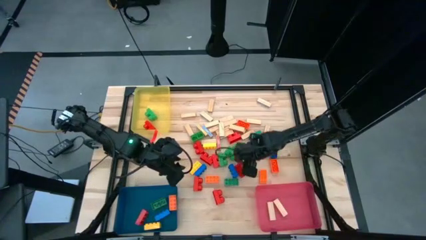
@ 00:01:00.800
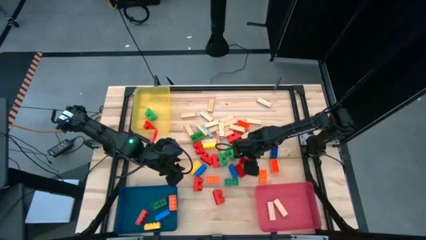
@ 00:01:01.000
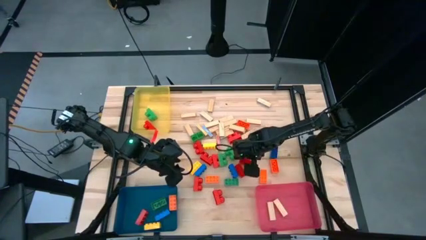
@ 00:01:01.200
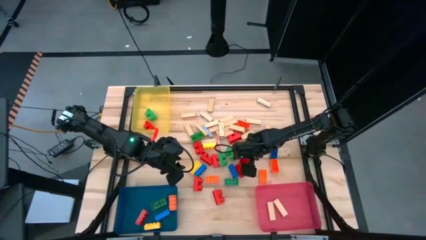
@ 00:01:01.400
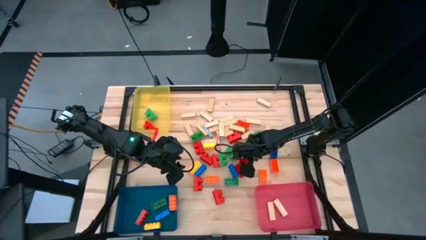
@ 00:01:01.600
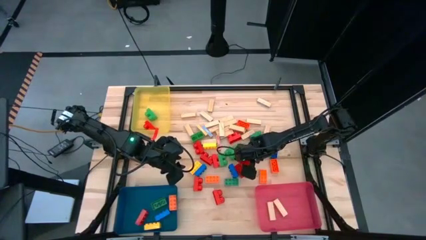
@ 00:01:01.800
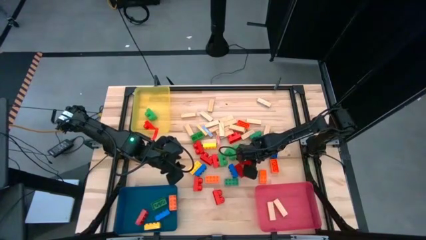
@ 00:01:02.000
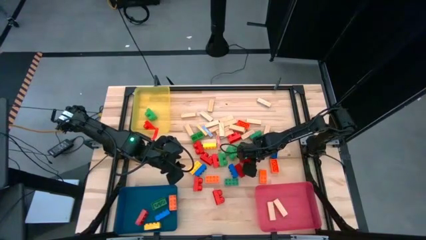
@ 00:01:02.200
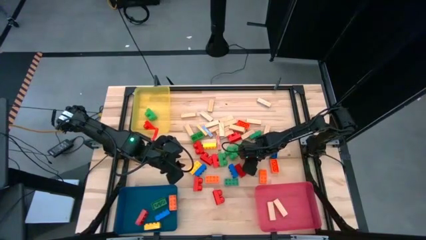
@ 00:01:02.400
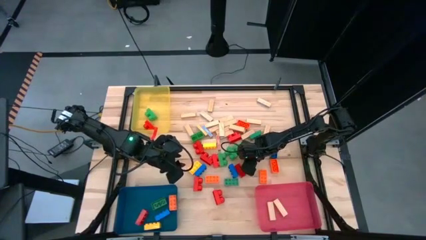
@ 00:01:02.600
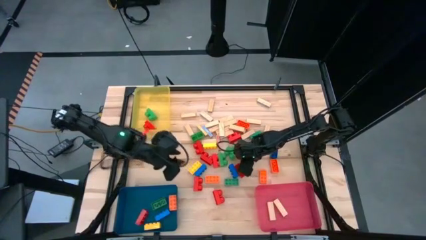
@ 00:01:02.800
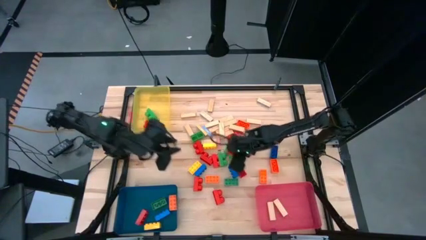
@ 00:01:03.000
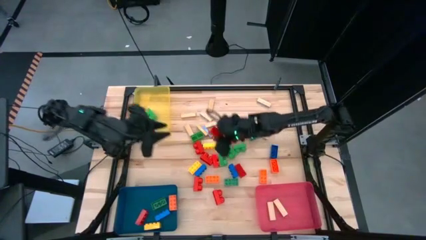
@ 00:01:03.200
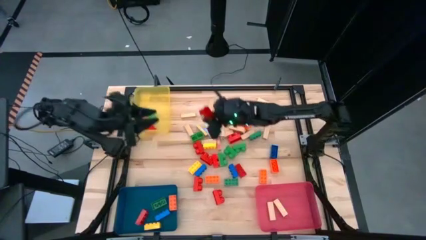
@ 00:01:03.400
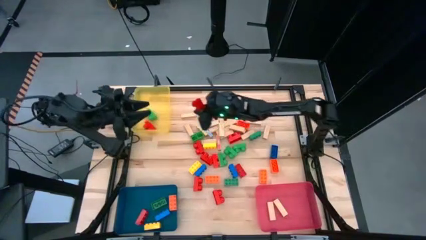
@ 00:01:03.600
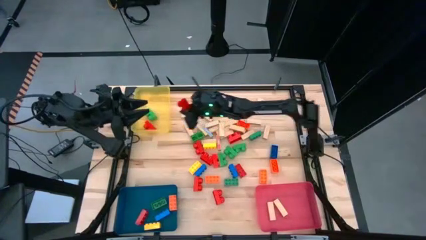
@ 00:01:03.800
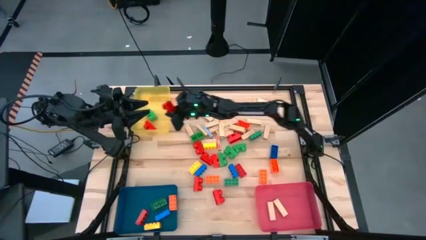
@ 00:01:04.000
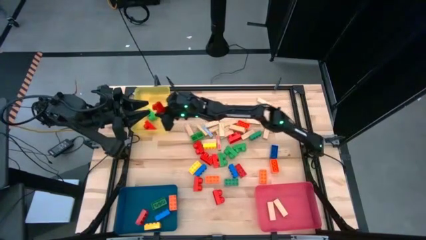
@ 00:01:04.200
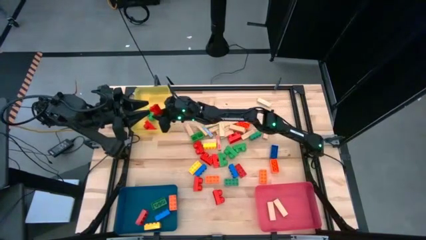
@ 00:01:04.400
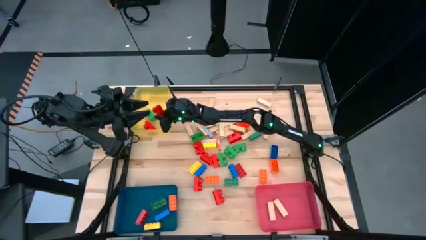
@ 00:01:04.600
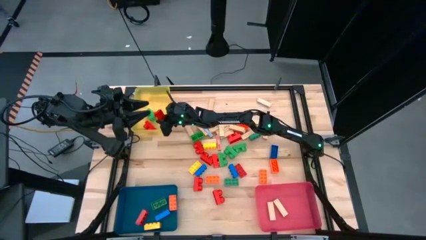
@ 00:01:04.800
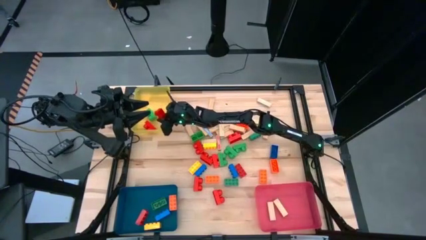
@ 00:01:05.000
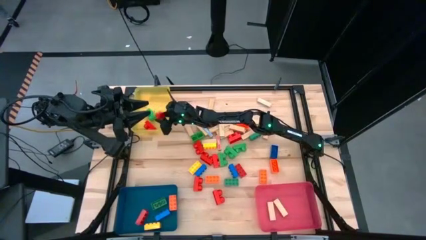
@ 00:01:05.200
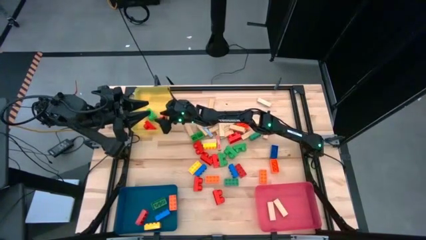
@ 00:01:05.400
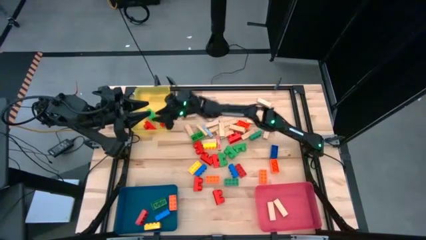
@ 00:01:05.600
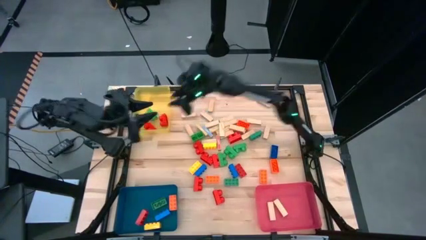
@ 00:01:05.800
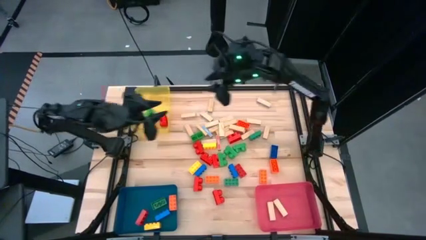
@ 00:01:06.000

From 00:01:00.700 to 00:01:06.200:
Task: Sort blocks by size
Put the round red game piece into the yellow bin

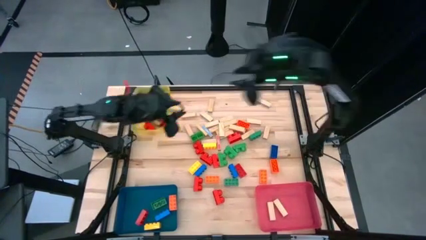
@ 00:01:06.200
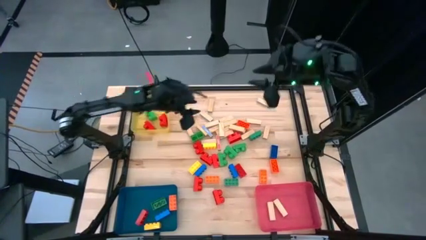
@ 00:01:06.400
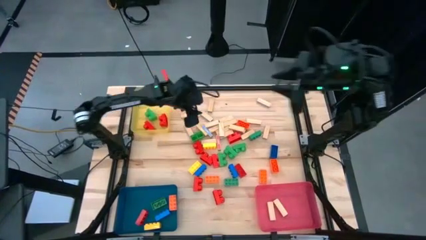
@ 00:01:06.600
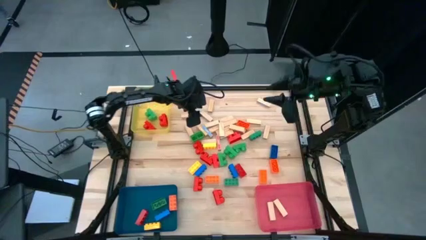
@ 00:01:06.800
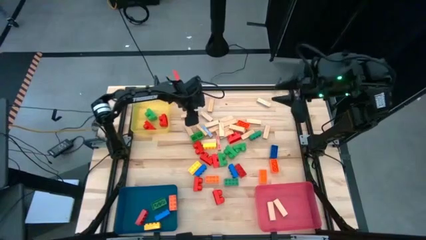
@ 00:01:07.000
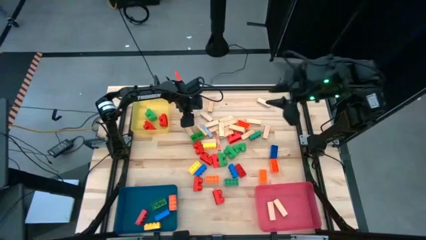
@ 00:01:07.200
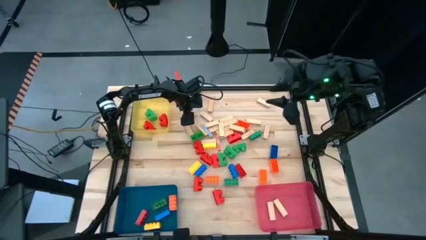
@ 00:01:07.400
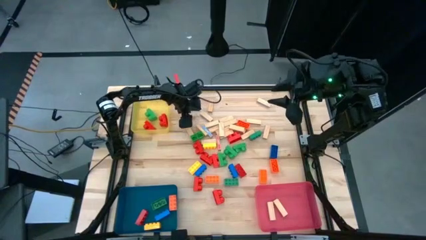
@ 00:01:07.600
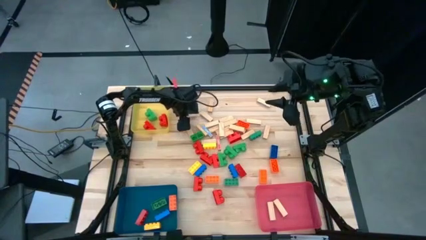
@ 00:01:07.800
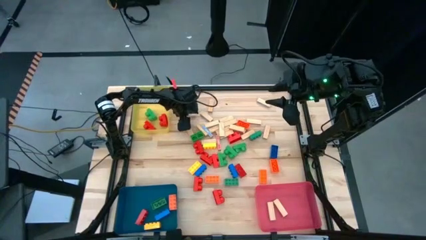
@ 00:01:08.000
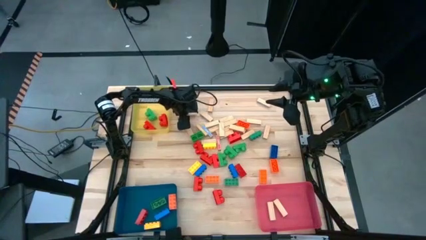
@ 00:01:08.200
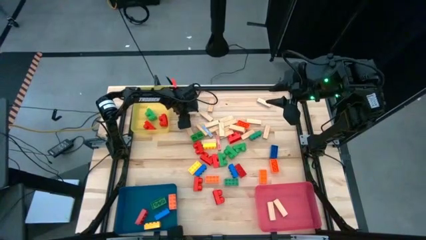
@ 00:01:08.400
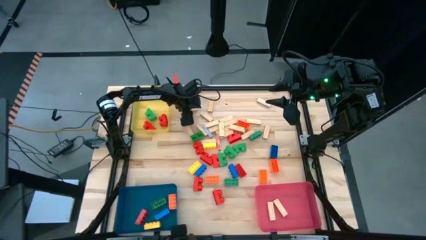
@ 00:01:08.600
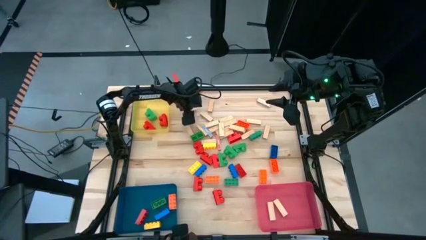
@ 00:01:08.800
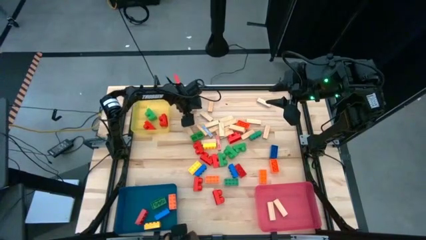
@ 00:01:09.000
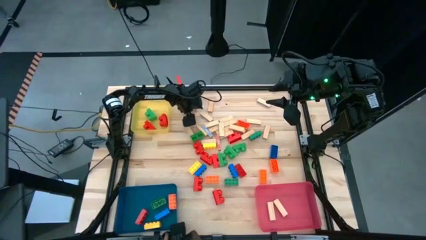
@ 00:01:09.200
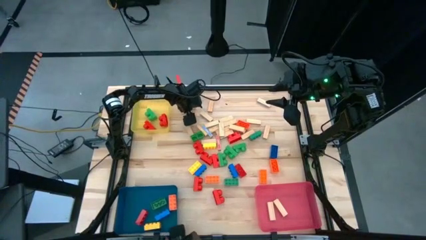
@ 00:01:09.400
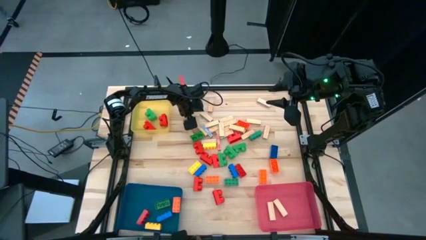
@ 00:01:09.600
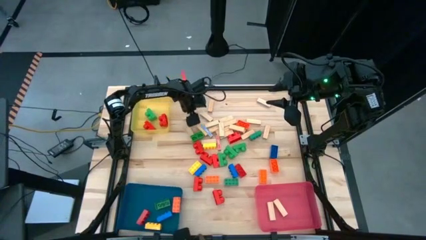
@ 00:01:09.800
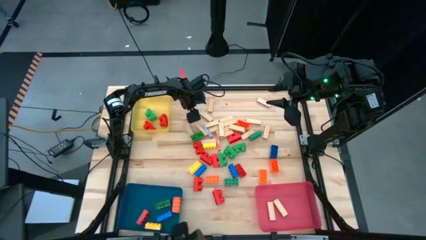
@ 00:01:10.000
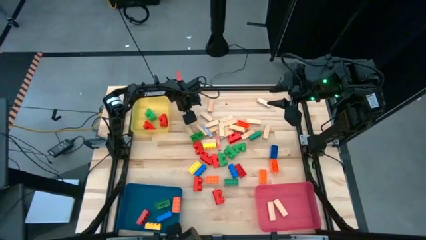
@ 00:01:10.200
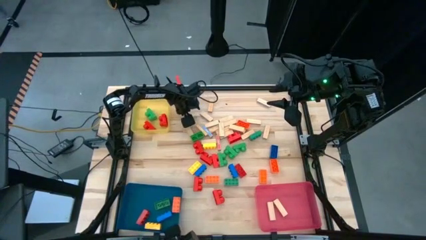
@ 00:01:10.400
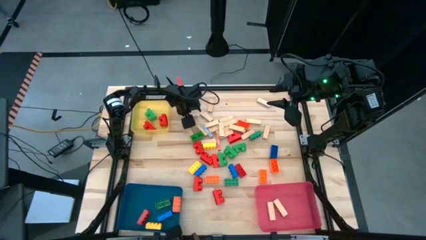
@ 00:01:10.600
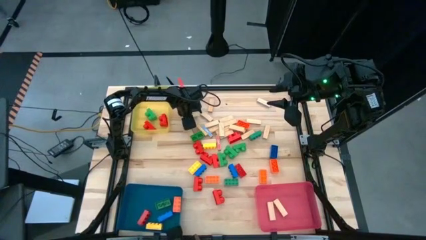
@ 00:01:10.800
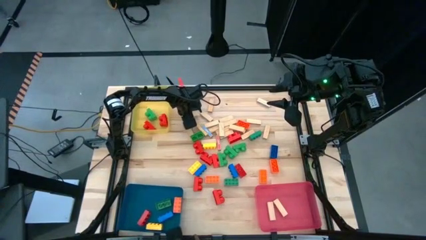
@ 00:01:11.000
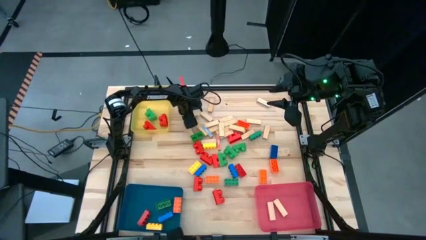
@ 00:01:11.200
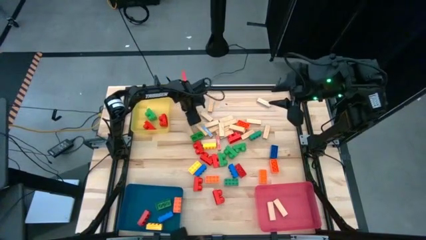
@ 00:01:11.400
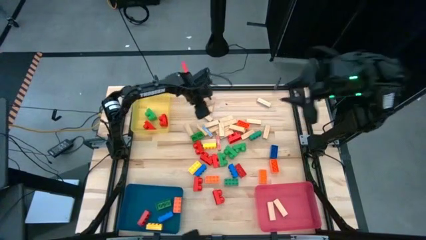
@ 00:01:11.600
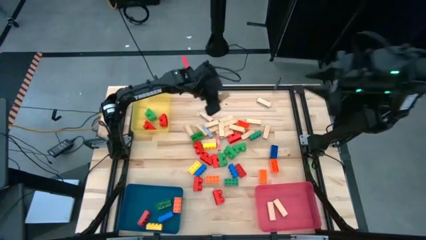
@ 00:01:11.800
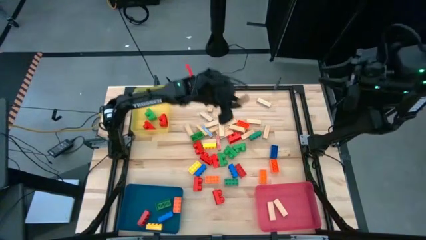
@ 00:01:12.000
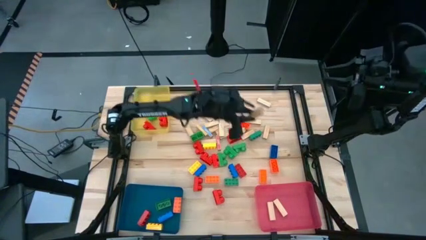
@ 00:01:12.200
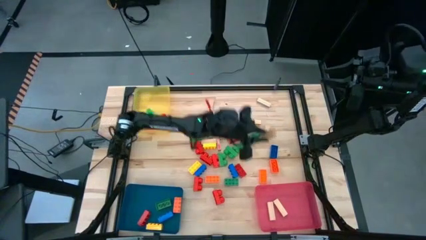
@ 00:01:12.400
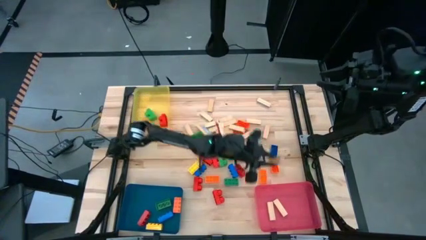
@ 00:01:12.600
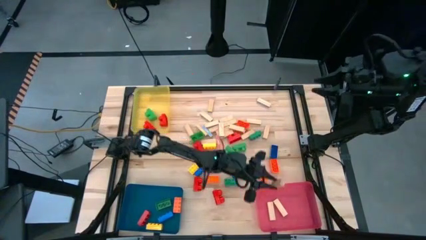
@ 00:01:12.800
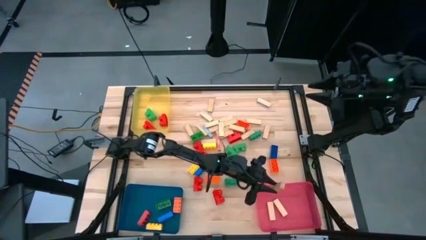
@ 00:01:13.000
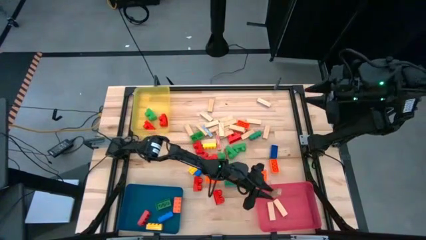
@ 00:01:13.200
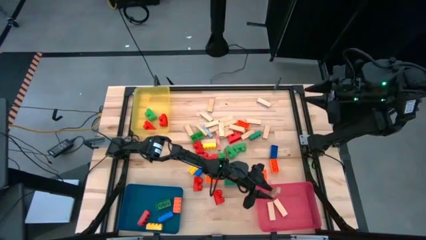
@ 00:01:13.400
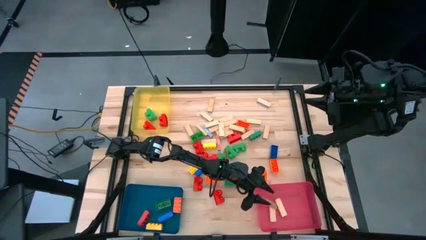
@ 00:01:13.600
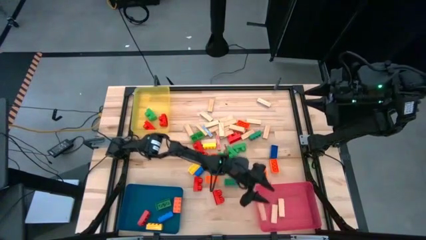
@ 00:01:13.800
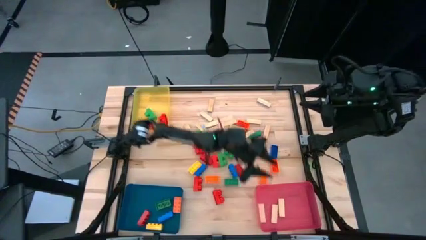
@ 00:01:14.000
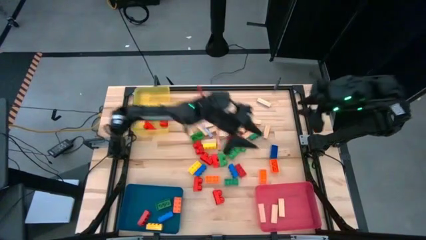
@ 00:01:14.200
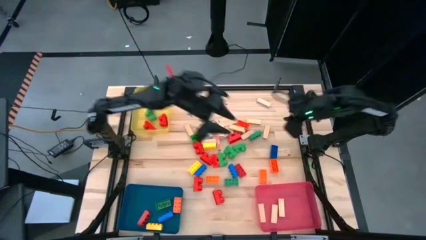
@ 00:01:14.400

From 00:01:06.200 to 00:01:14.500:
Put the wooden block into the red bin

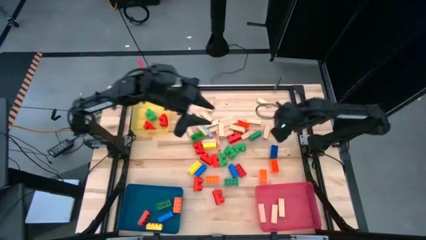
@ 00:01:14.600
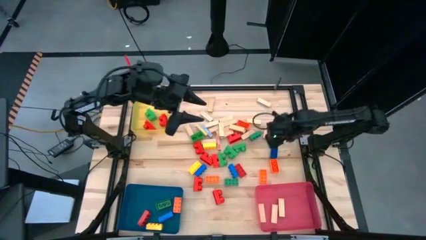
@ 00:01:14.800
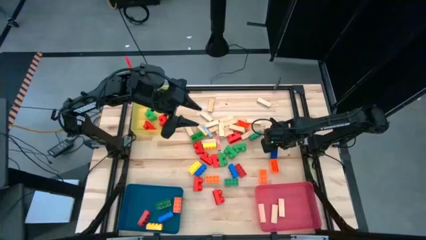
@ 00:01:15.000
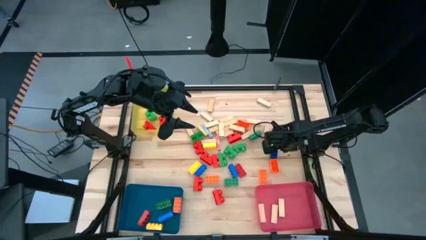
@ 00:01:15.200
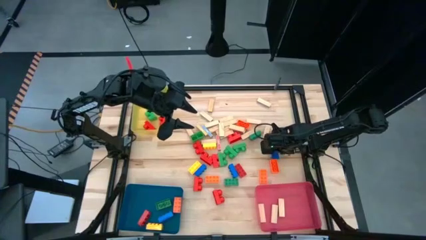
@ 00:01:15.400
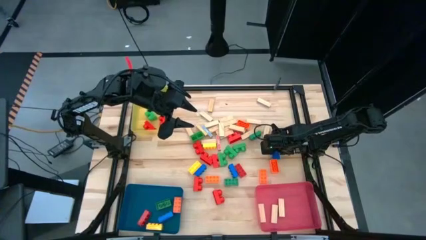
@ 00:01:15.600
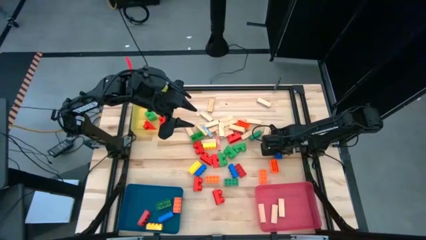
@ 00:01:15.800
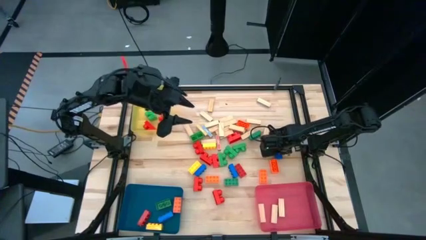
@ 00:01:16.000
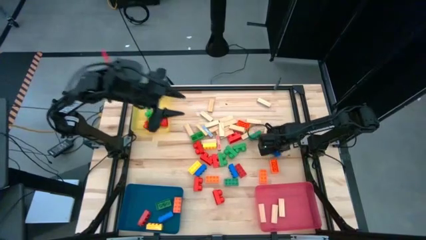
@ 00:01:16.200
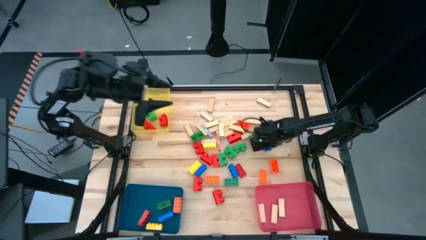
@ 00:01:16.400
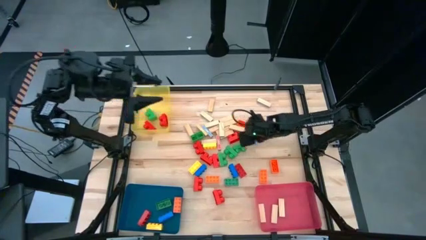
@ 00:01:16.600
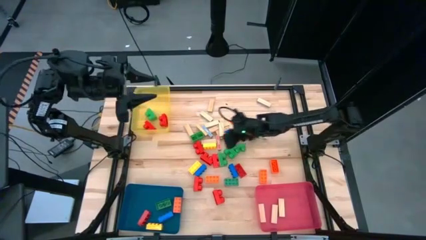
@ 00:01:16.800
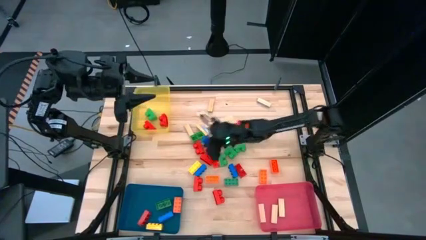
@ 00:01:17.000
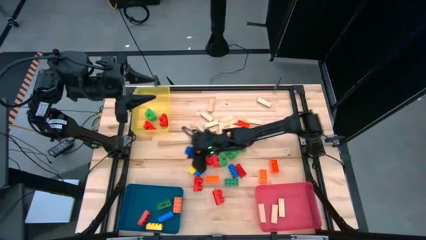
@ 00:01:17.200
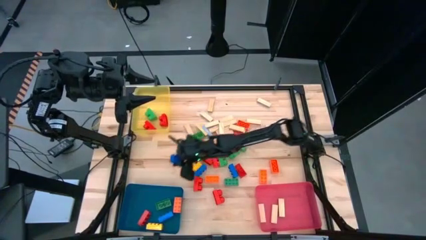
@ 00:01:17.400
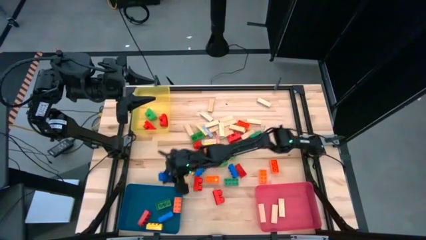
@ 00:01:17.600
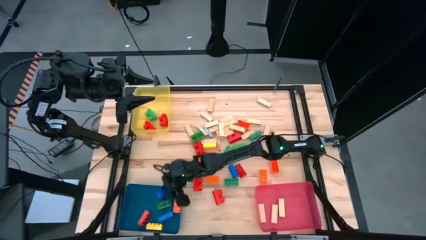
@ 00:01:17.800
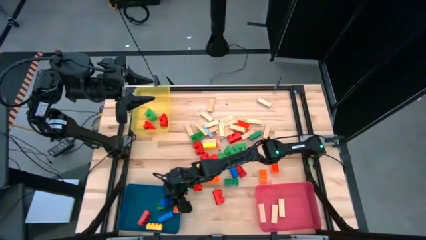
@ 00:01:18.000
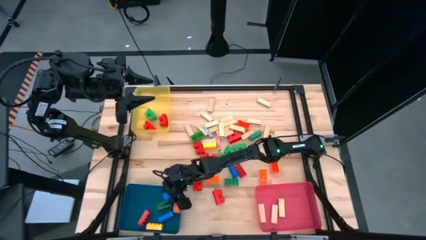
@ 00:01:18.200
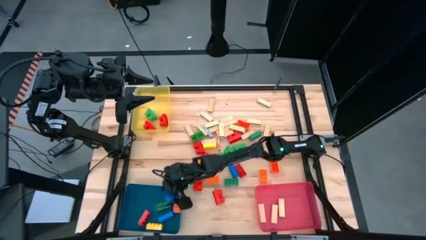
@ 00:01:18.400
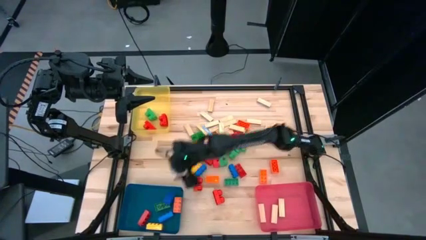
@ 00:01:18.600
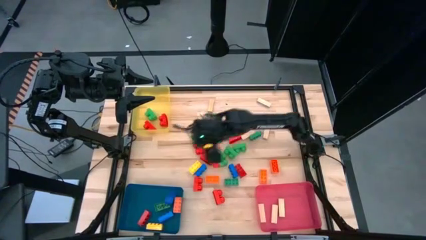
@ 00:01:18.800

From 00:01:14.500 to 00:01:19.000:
Put the blue game piece into the blue bin
